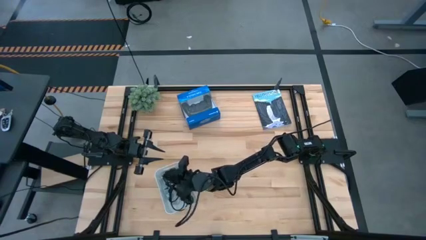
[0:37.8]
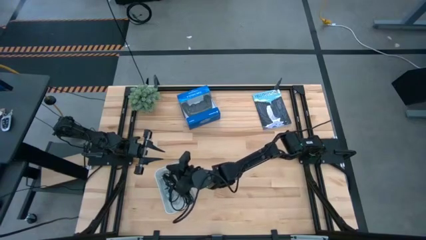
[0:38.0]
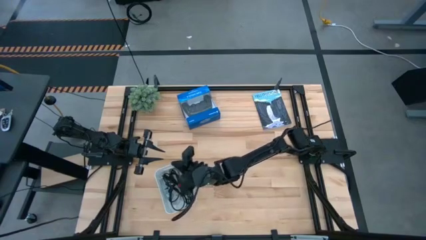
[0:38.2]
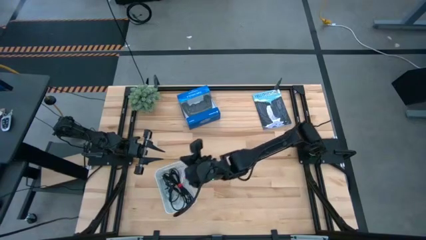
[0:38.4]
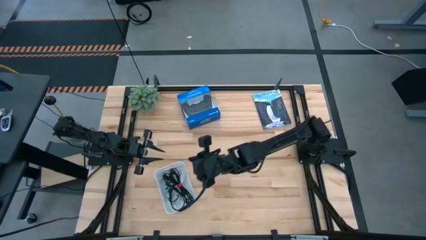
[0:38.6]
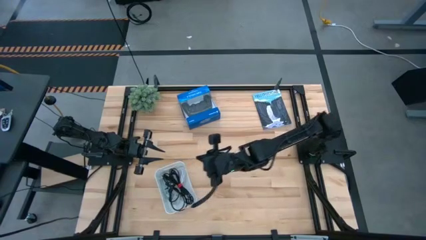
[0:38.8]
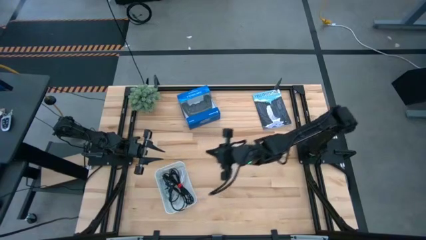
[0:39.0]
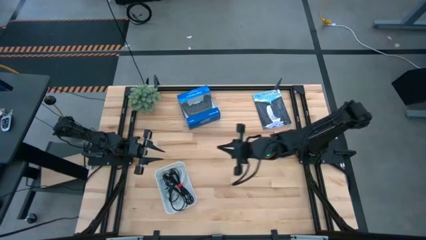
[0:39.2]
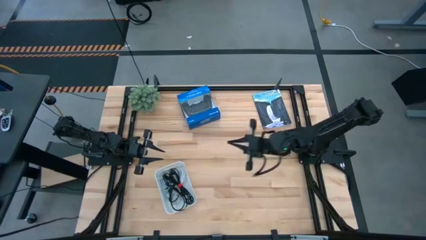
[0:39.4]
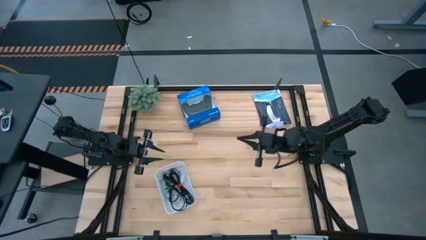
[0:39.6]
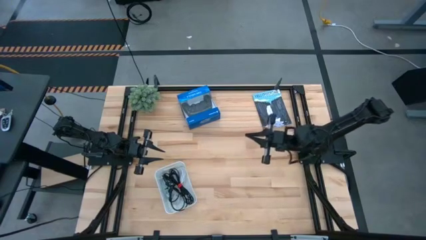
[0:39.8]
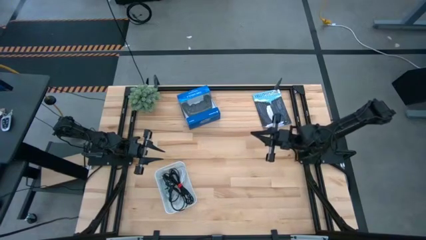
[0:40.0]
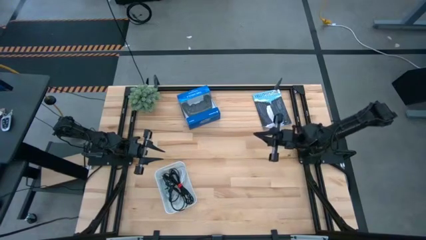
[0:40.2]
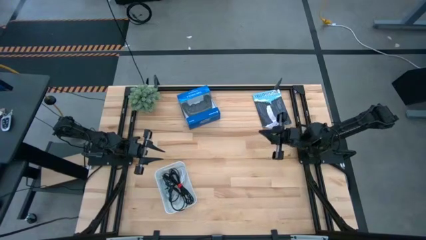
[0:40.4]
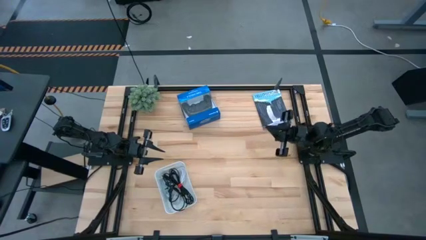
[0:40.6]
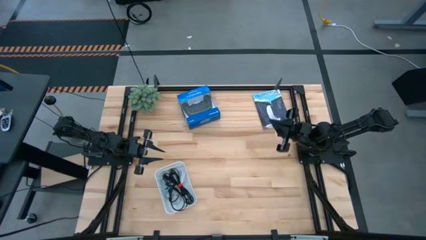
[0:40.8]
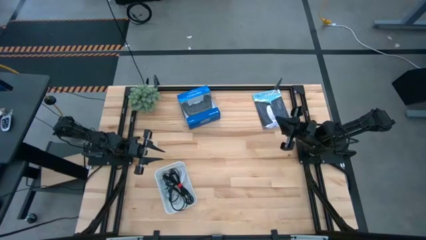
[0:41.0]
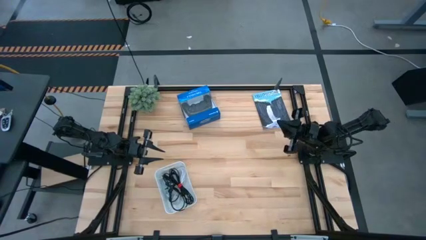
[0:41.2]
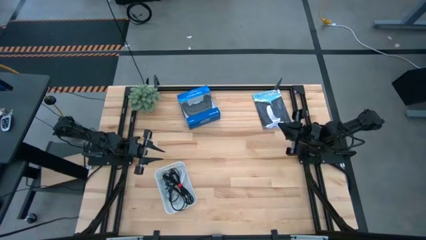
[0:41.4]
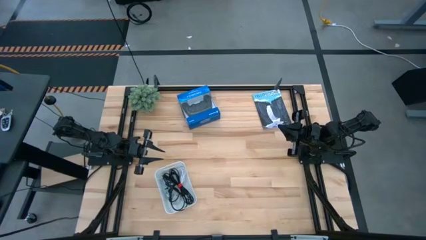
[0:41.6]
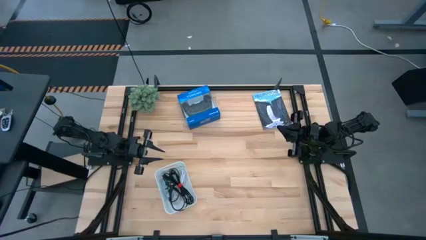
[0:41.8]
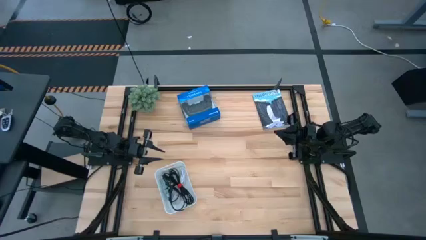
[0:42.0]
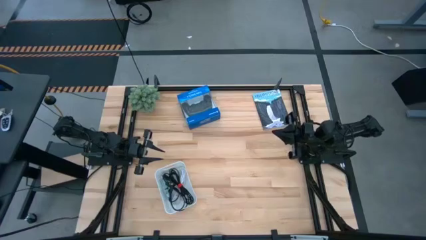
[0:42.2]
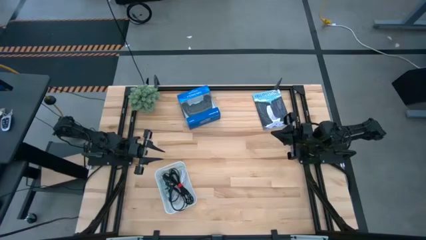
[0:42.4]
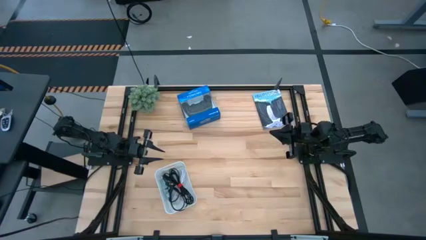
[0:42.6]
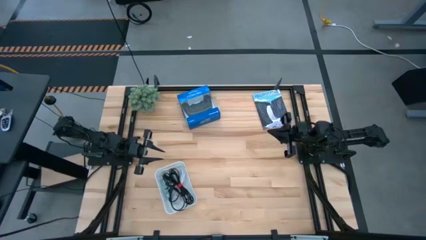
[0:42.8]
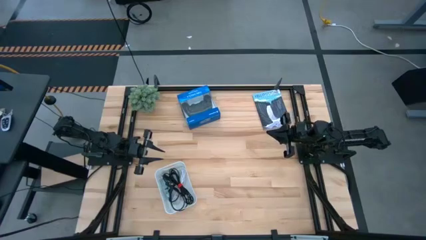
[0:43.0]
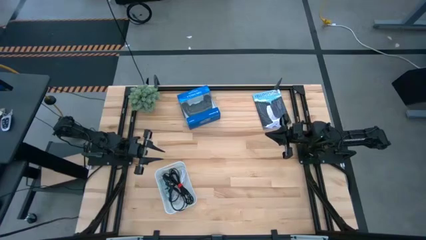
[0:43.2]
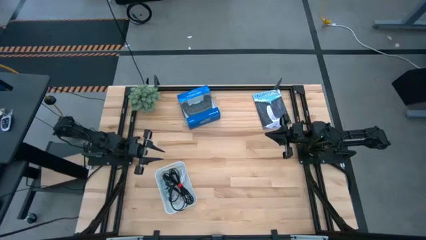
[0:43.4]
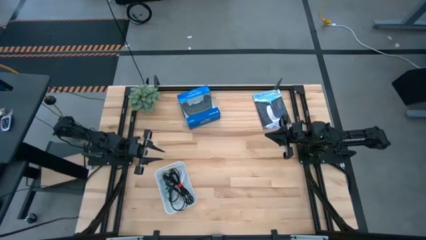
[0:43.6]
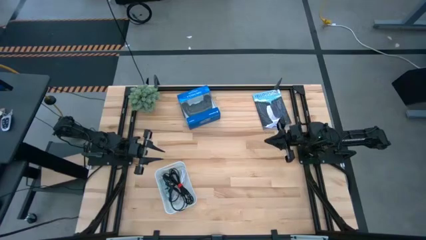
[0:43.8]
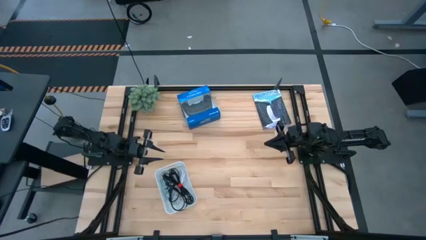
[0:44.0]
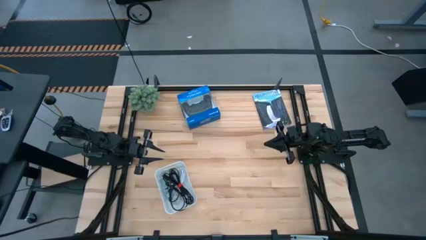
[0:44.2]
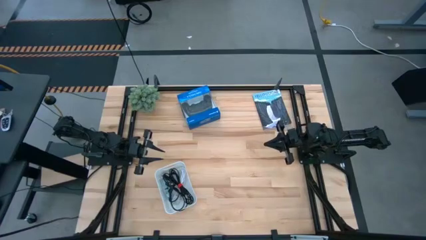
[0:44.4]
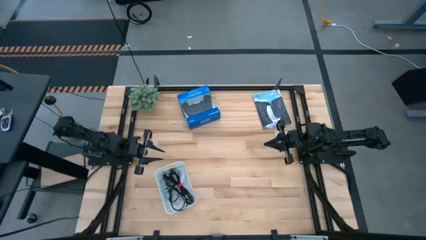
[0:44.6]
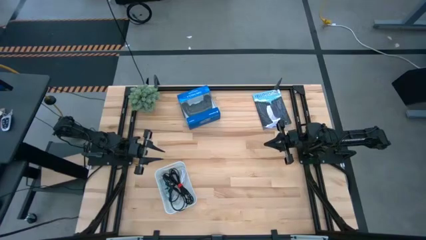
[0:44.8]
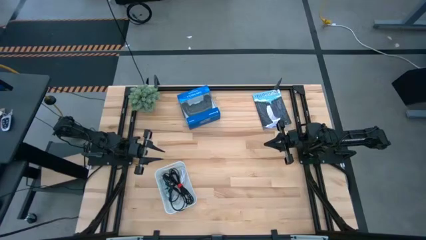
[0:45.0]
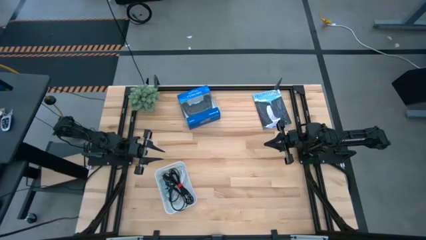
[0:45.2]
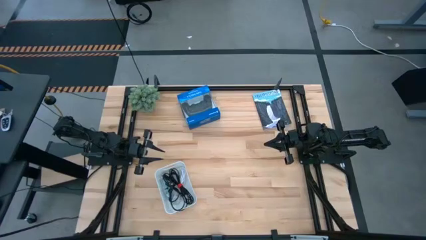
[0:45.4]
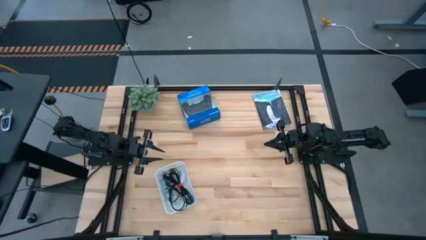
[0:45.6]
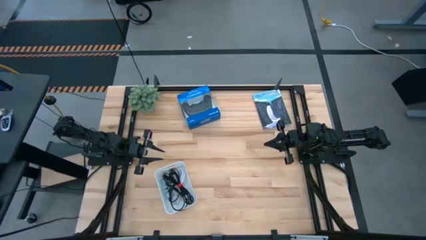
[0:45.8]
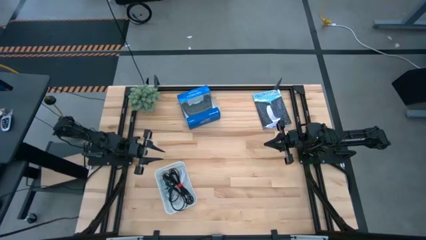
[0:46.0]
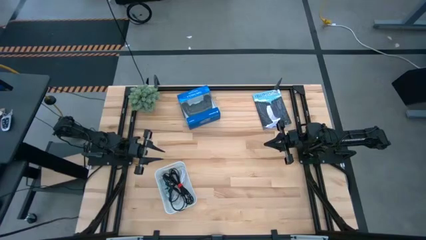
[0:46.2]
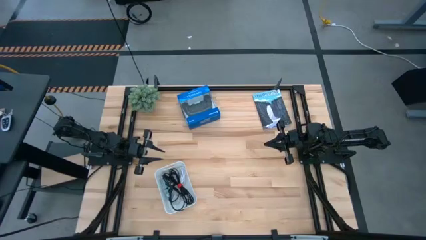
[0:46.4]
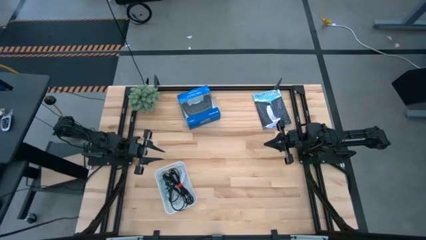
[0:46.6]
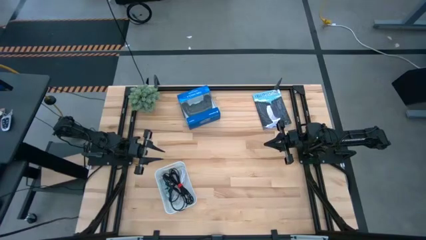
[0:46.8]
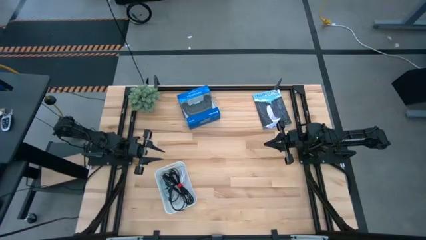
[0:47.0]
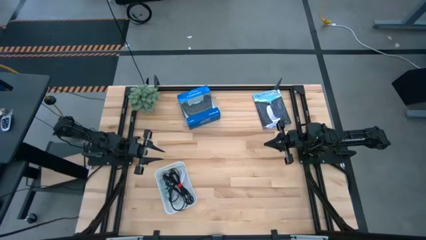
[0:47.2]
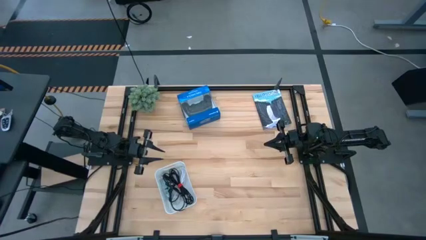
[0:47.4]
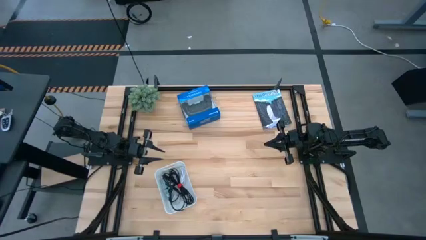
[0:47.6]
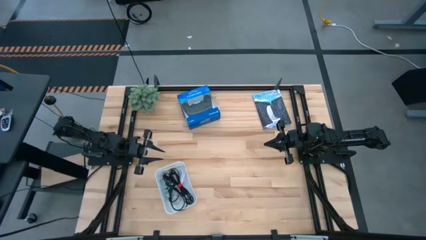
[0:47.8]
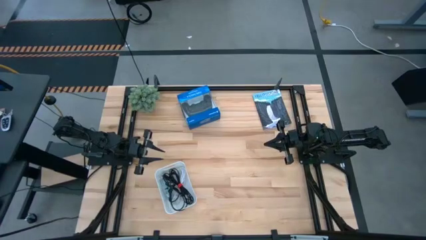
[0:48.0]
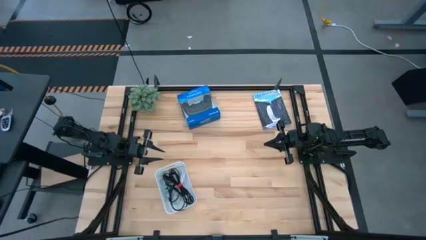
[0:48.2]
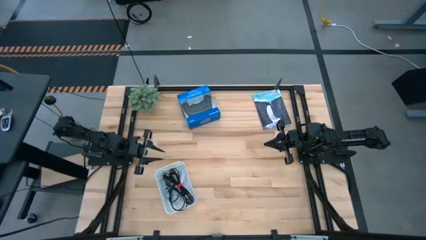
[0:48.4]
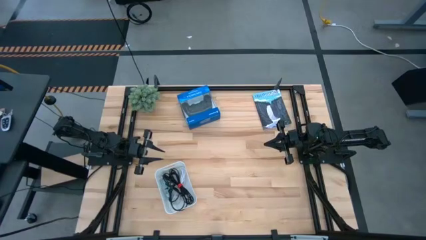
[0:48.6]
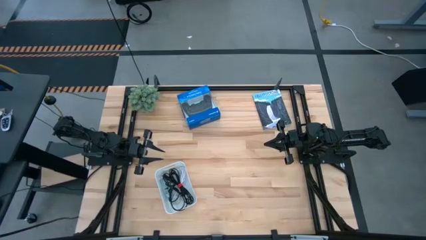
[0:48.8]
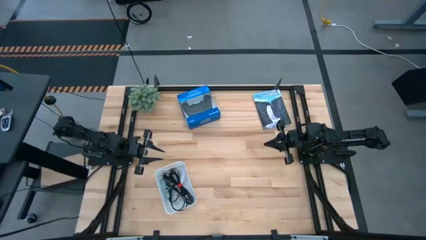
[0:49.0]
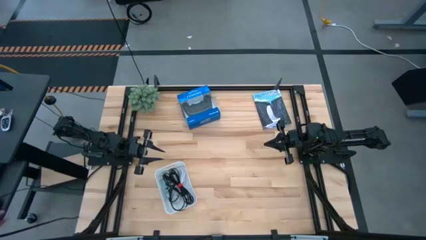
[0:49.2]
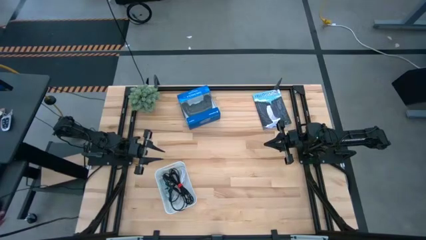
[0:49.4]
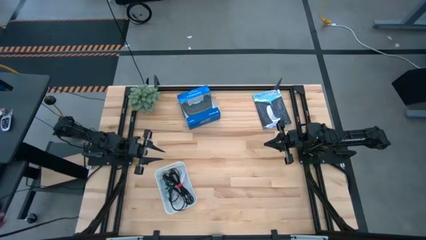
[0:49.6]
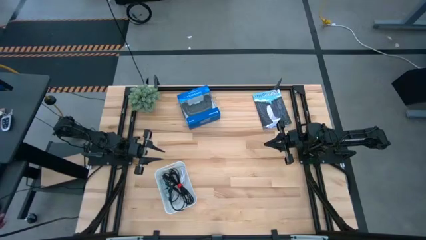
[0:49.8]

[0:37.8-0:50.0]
Task: Pick and place USB-C Cables
Return to Home Position

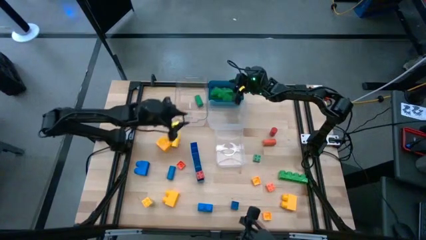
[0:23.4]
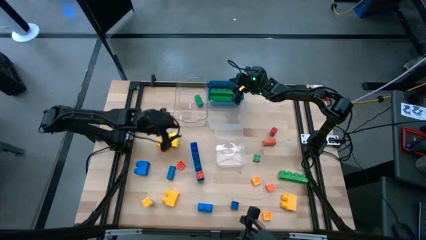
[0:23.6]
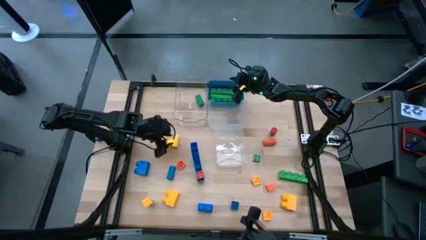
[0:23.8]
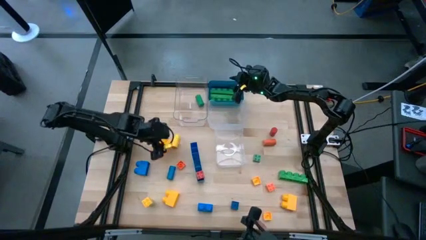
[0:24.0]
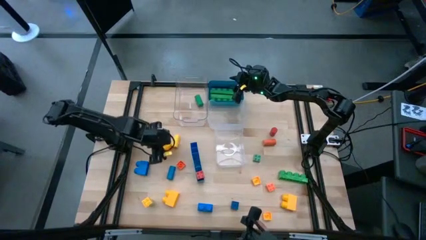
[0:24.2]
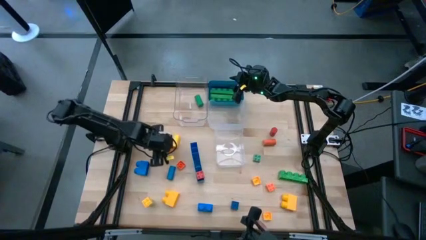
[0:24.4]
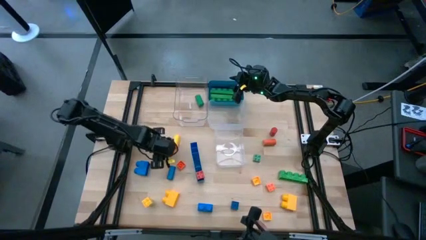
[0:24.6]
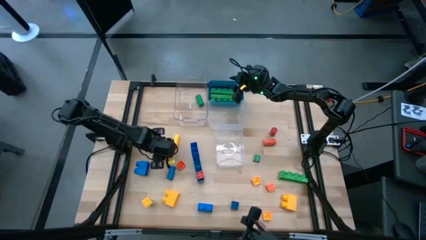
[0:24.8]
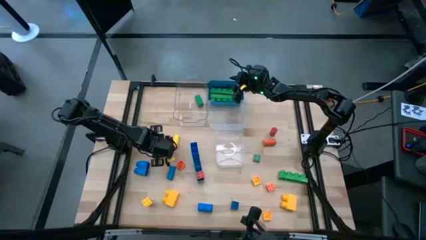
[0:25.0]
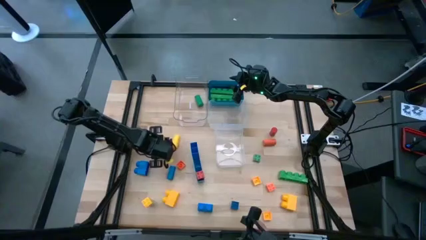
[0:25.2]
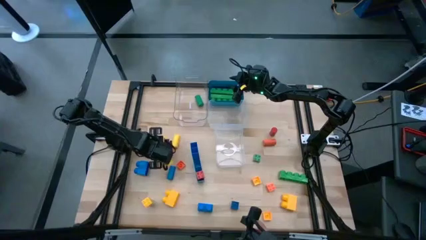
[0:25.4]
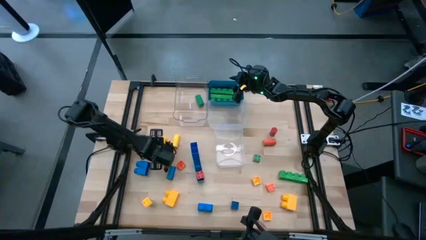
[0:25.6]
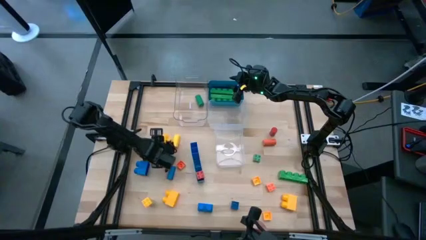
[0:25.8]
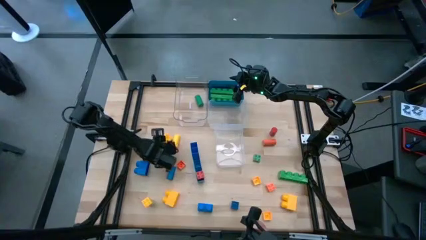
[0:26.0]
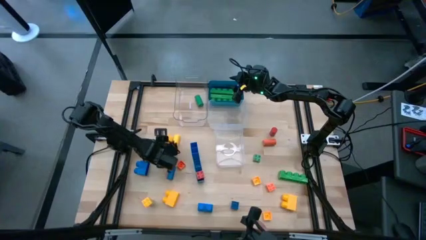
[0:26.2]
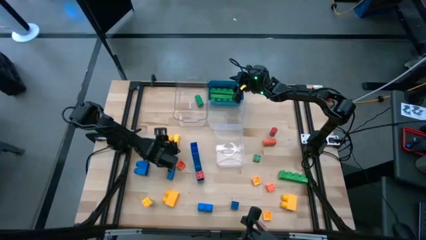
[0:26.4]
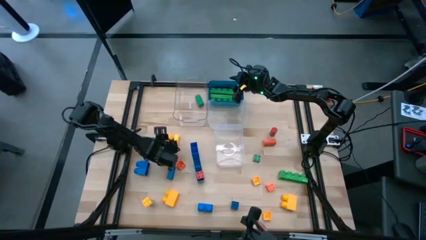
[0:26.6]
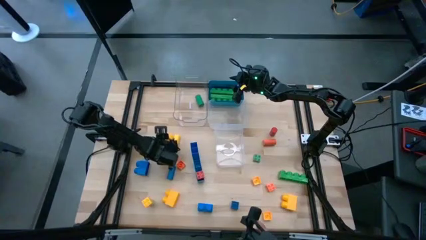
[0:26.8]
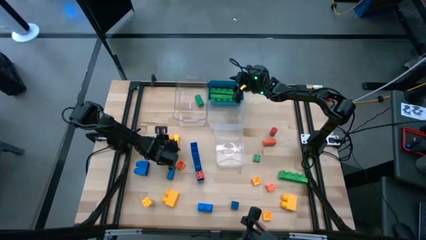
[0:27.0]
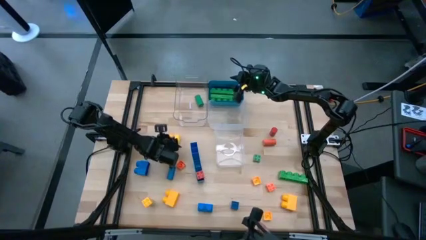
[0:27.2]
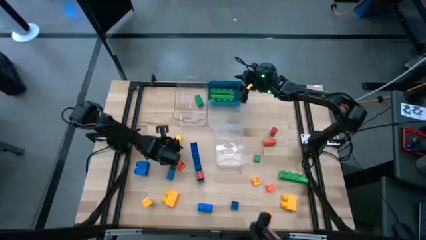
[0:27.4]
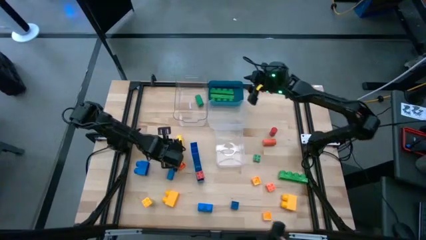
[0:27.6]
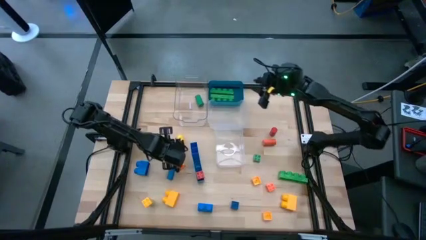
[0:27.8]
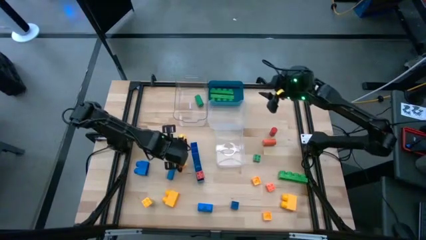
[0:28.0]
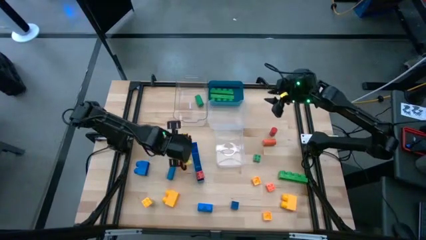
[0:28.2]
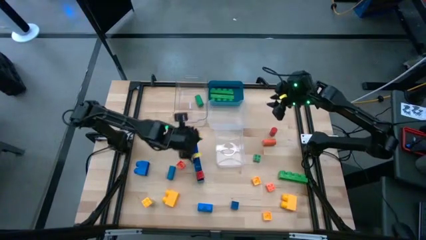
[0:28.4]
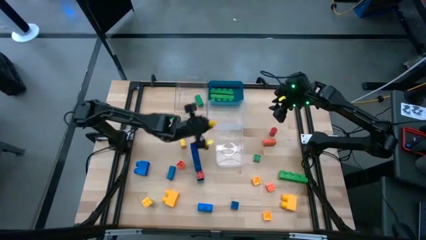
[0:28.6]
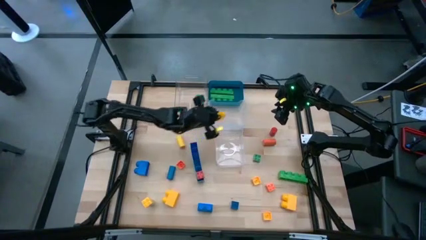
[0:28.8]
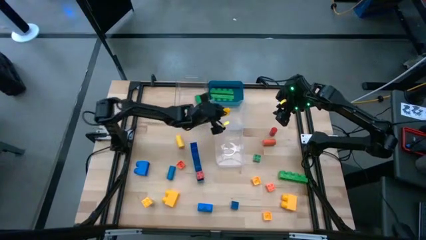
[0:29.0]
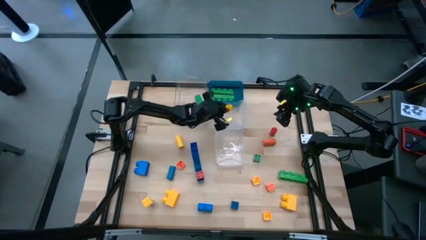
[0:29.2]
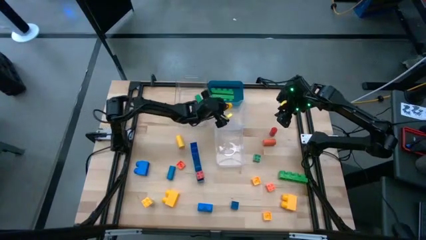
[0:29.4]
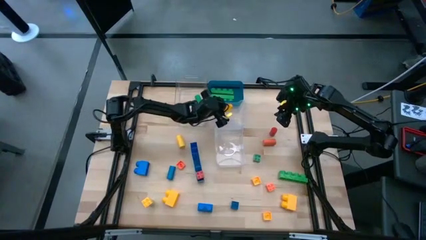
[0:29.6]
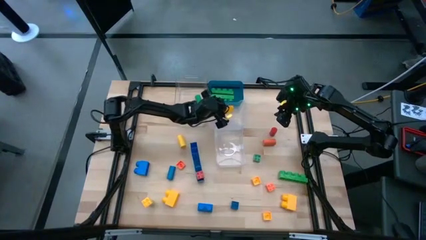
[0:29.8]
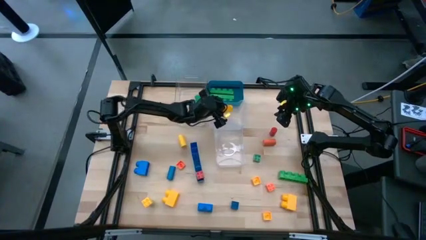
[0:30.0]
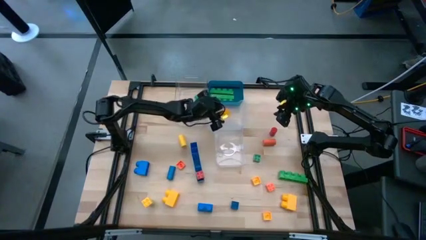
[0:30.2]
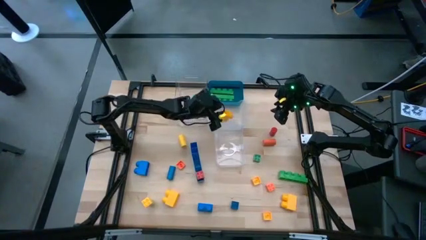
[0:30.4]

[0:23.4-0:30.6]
Task: Sort blocks by size
Put the yellow 2 stud game piece into the top right transparent bin
